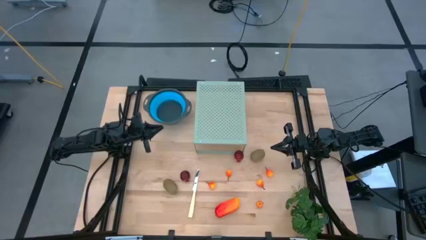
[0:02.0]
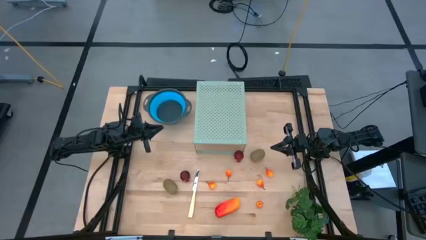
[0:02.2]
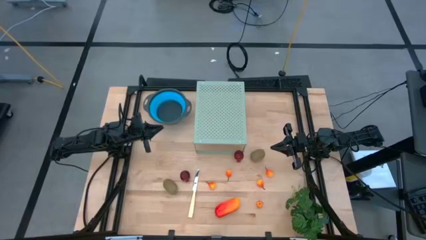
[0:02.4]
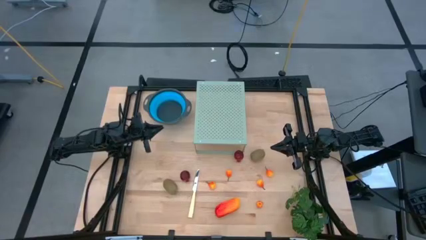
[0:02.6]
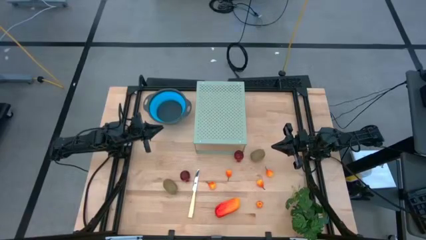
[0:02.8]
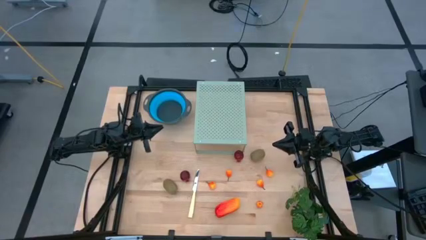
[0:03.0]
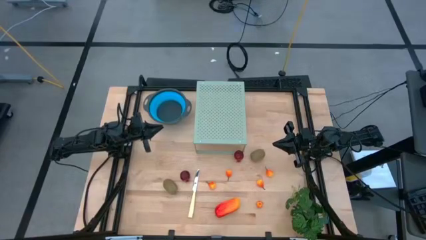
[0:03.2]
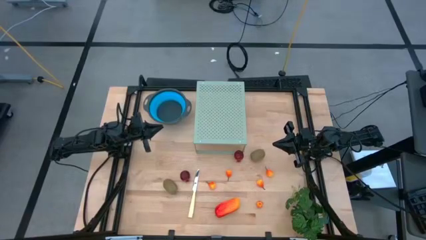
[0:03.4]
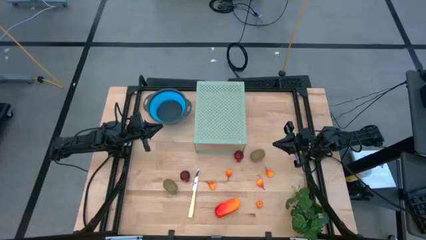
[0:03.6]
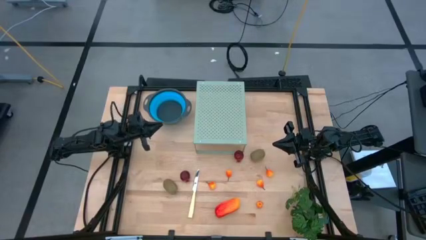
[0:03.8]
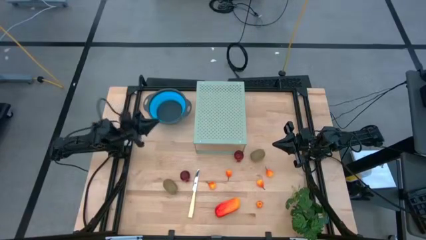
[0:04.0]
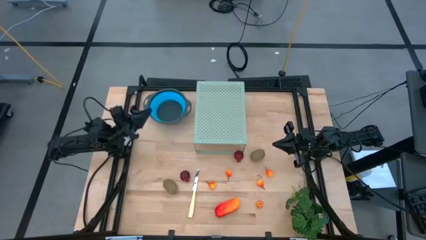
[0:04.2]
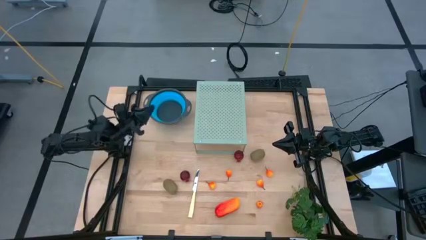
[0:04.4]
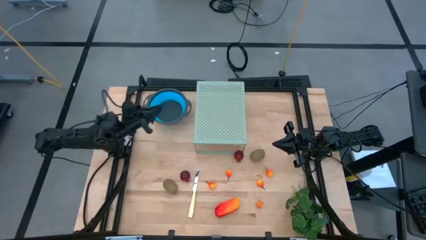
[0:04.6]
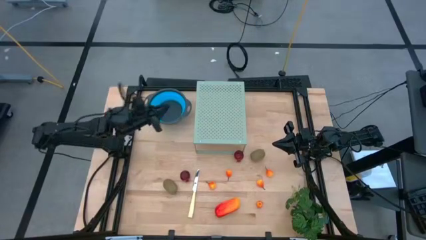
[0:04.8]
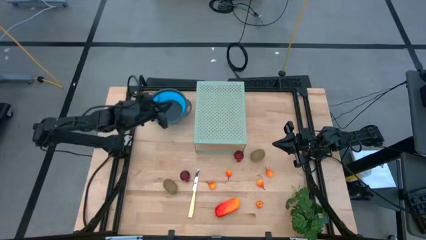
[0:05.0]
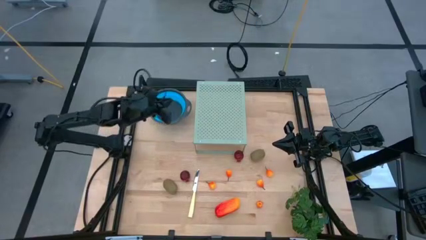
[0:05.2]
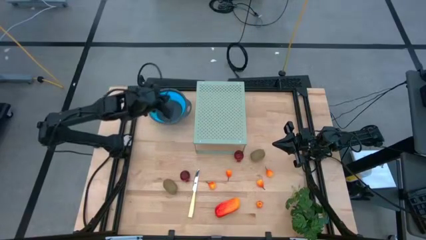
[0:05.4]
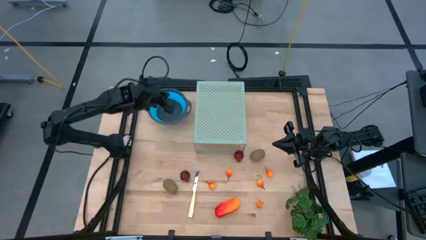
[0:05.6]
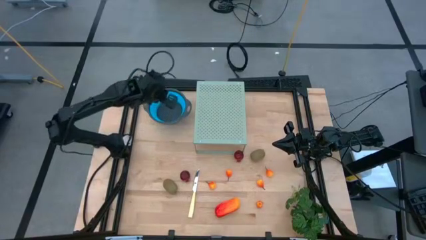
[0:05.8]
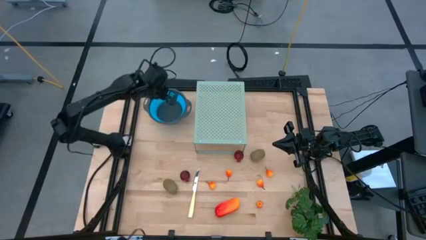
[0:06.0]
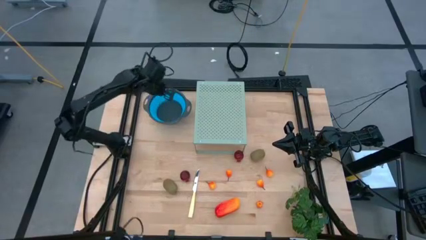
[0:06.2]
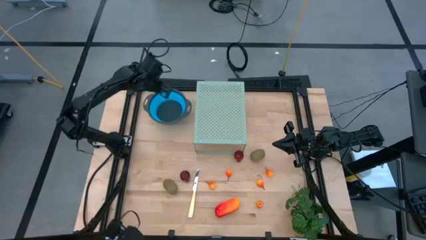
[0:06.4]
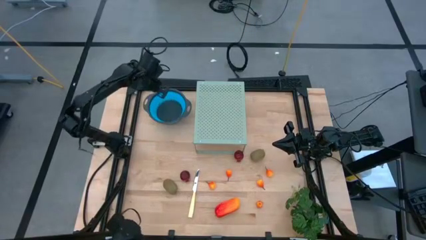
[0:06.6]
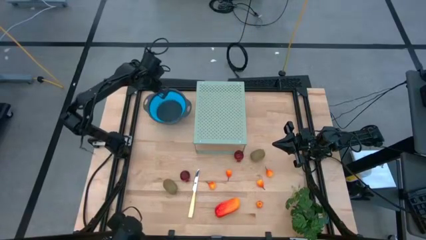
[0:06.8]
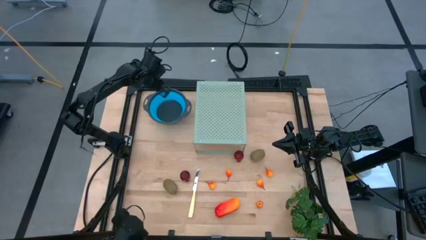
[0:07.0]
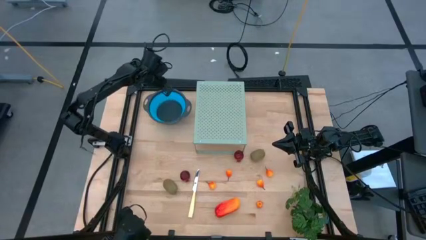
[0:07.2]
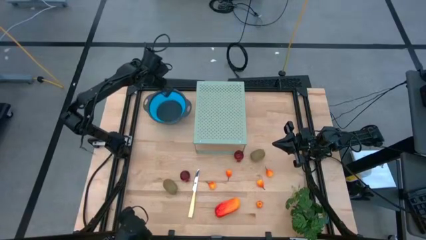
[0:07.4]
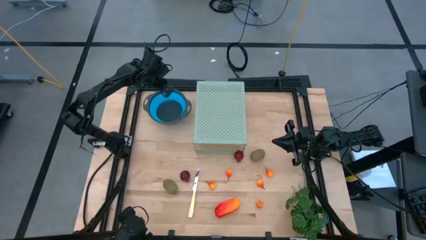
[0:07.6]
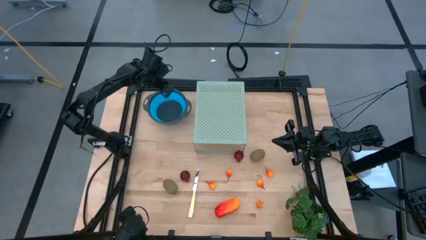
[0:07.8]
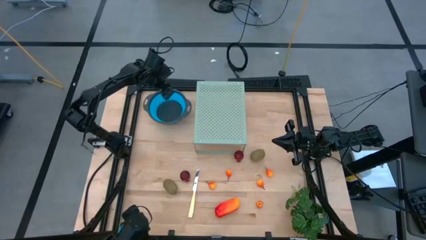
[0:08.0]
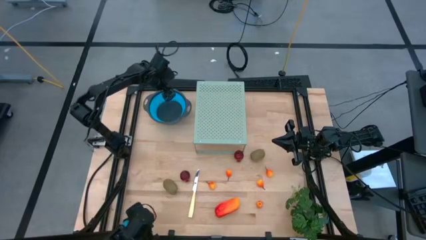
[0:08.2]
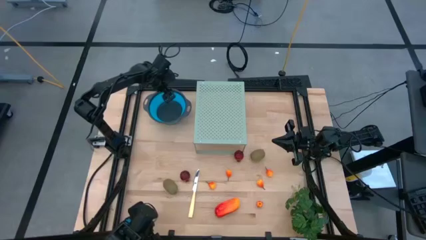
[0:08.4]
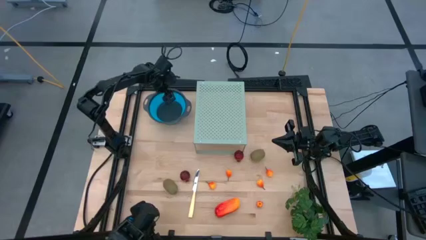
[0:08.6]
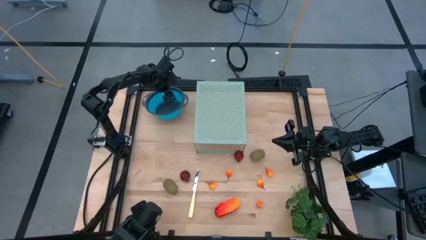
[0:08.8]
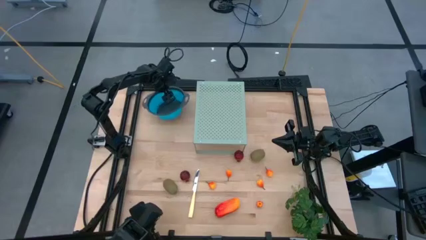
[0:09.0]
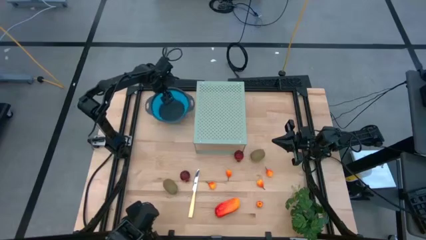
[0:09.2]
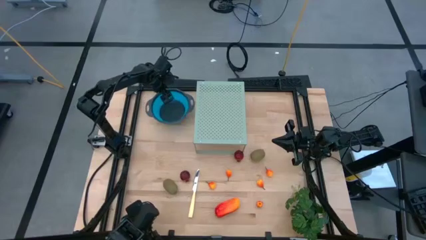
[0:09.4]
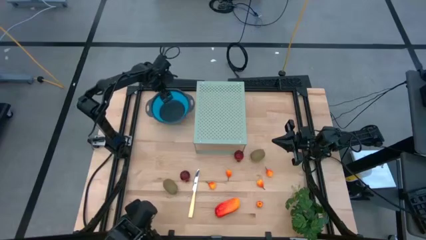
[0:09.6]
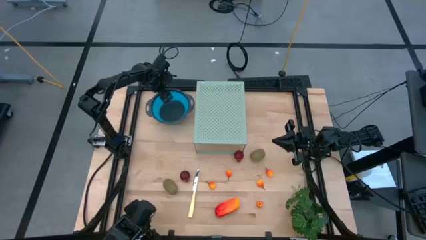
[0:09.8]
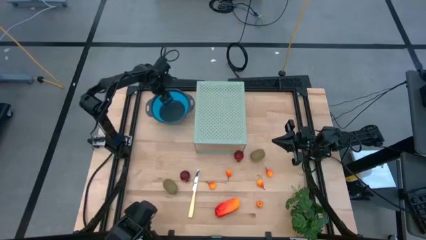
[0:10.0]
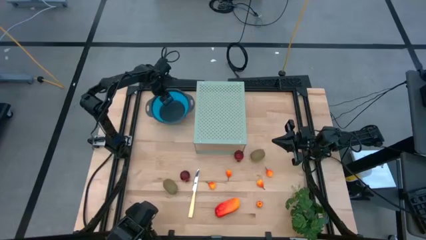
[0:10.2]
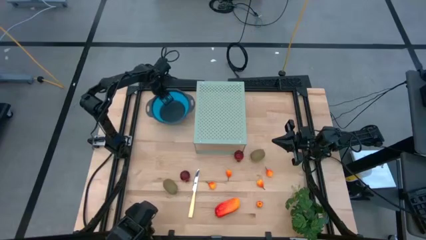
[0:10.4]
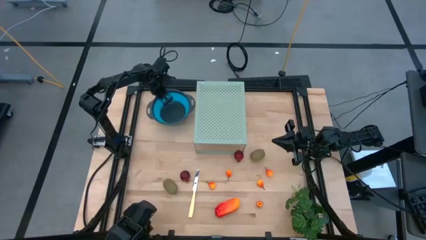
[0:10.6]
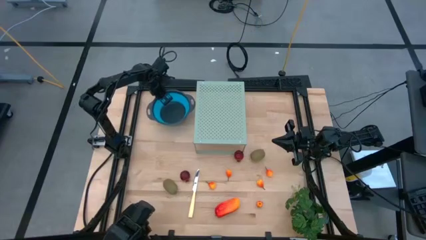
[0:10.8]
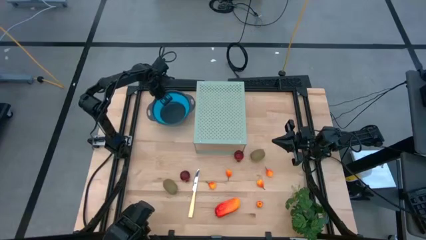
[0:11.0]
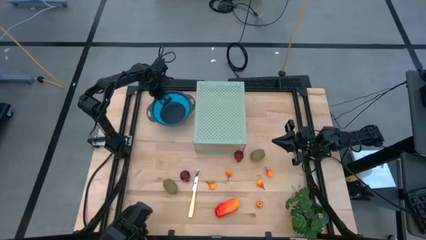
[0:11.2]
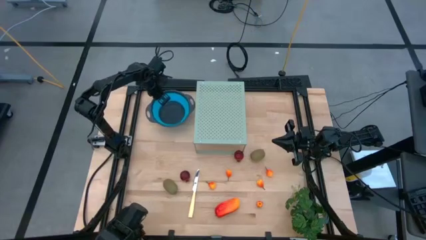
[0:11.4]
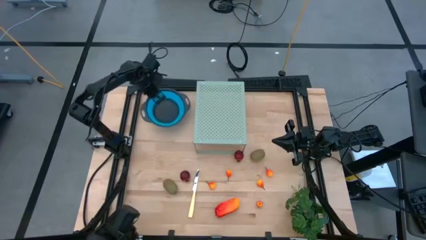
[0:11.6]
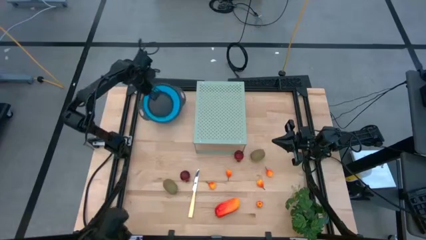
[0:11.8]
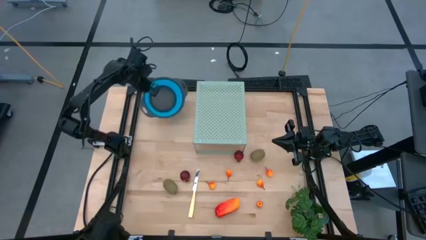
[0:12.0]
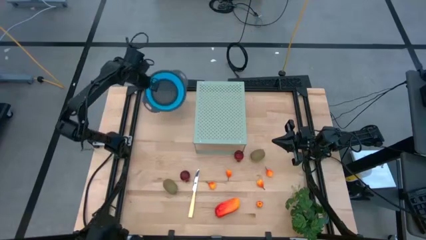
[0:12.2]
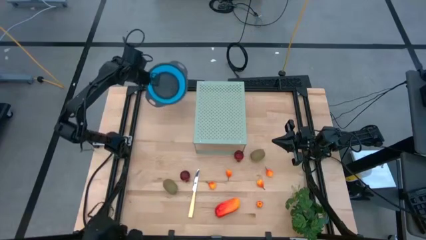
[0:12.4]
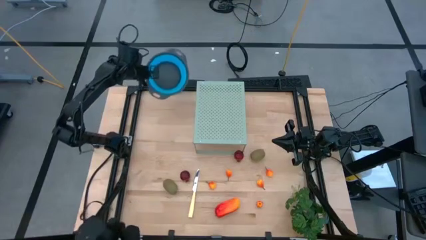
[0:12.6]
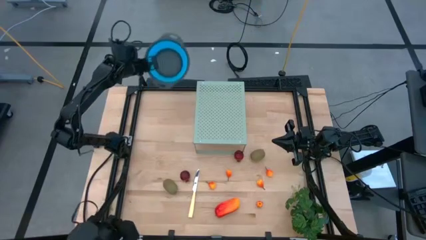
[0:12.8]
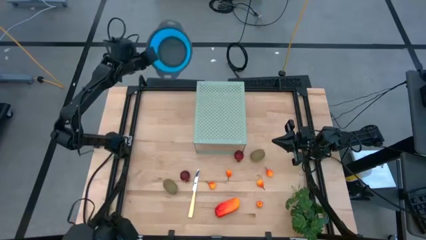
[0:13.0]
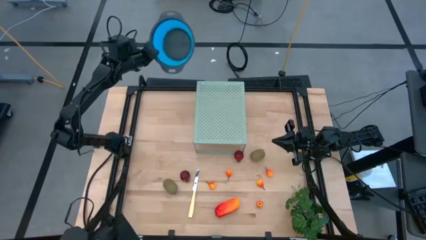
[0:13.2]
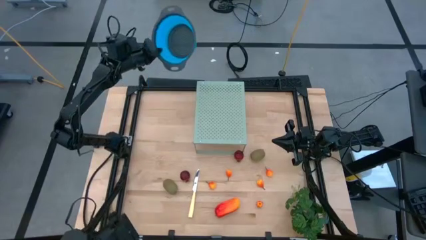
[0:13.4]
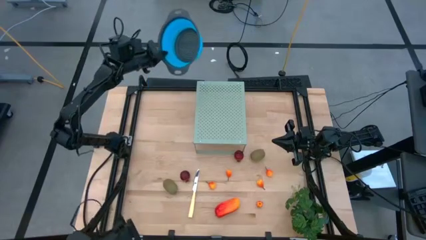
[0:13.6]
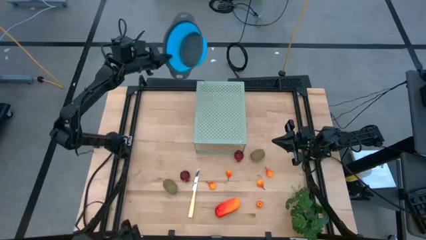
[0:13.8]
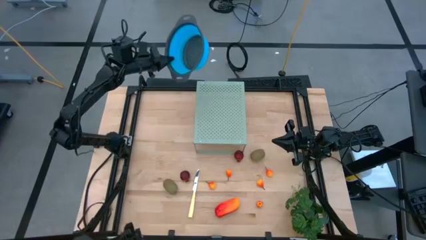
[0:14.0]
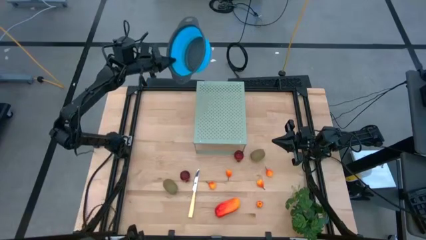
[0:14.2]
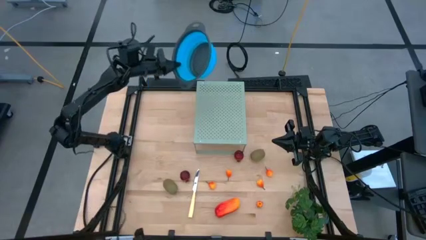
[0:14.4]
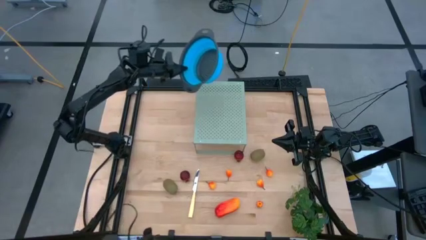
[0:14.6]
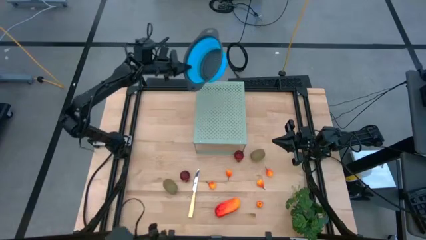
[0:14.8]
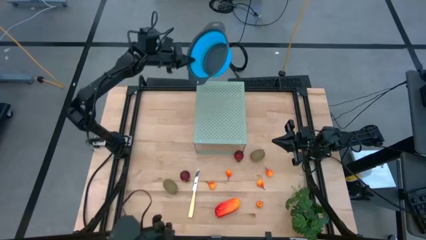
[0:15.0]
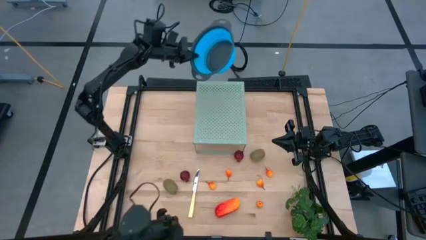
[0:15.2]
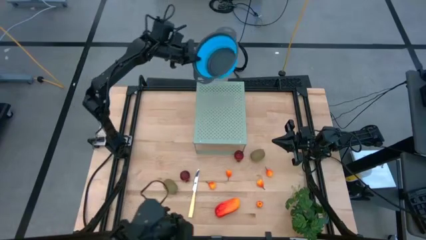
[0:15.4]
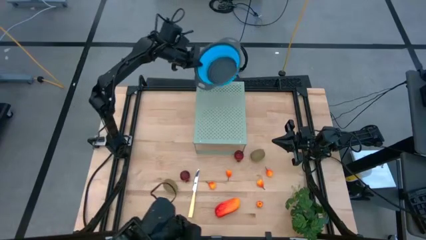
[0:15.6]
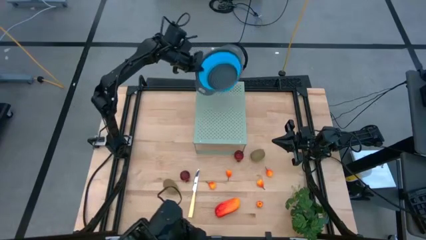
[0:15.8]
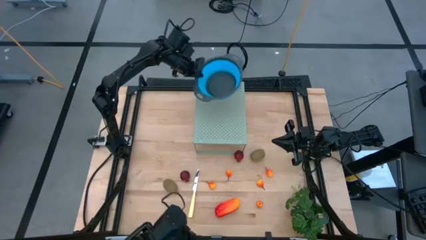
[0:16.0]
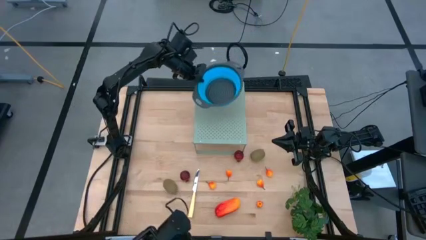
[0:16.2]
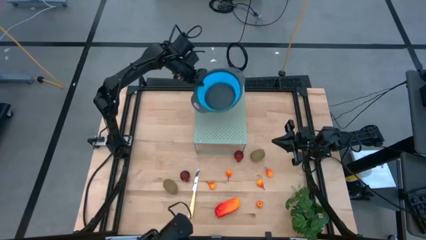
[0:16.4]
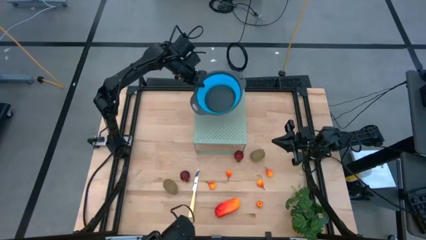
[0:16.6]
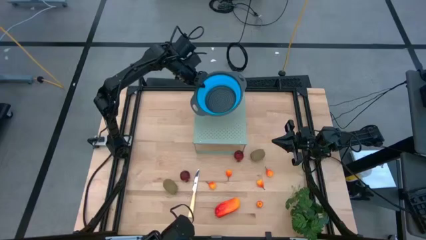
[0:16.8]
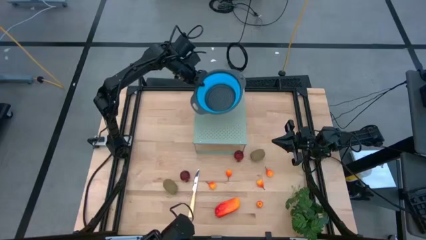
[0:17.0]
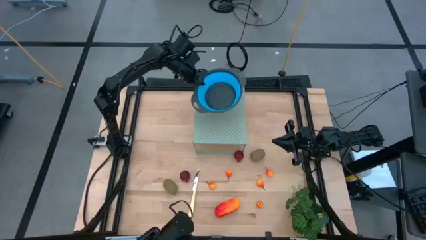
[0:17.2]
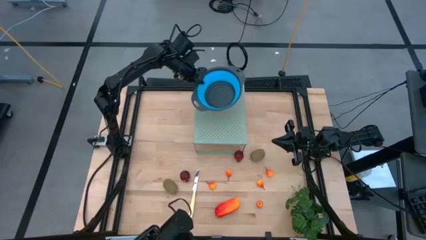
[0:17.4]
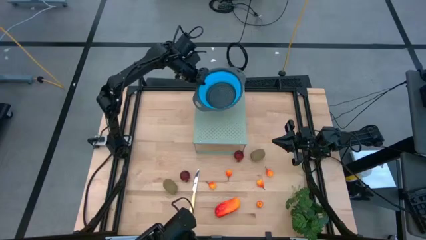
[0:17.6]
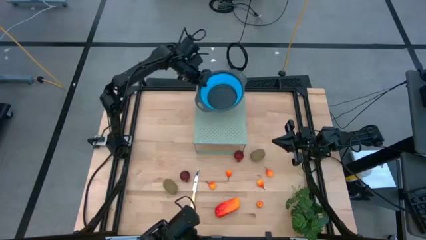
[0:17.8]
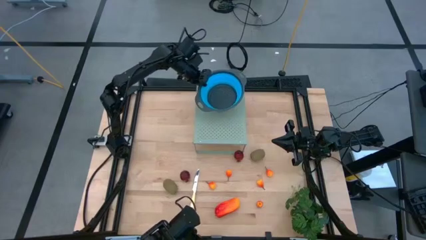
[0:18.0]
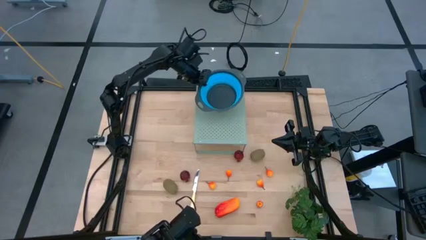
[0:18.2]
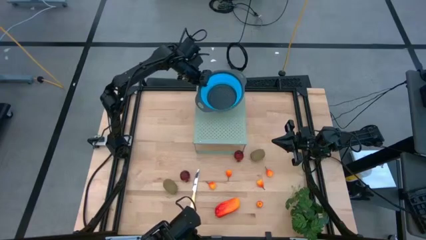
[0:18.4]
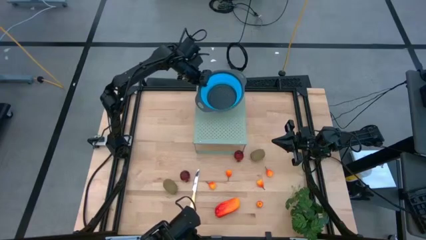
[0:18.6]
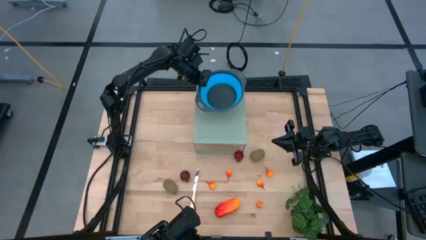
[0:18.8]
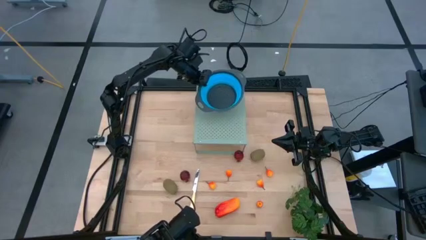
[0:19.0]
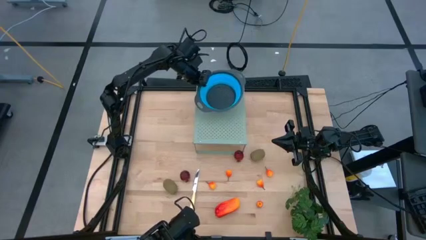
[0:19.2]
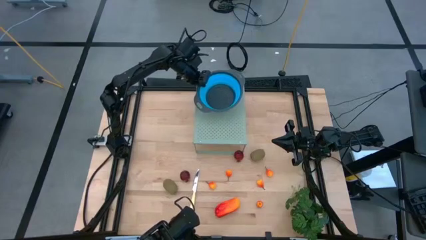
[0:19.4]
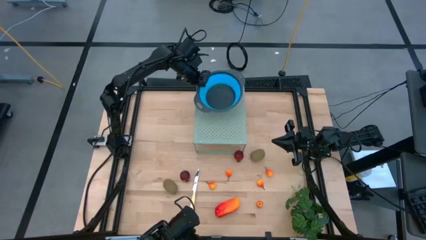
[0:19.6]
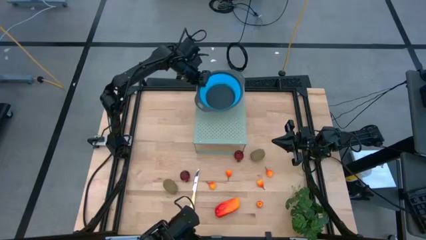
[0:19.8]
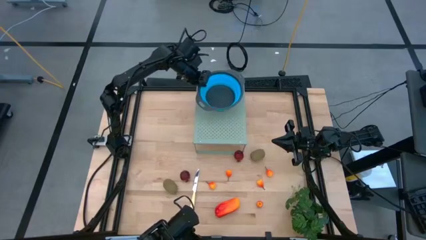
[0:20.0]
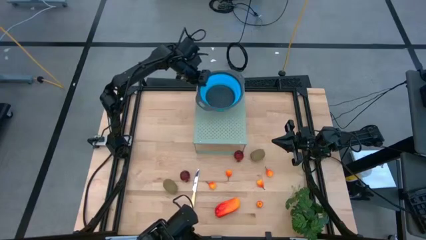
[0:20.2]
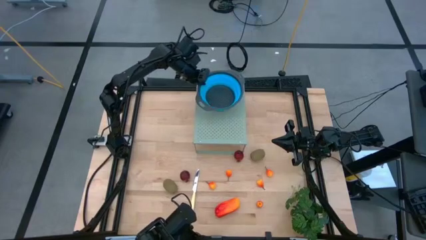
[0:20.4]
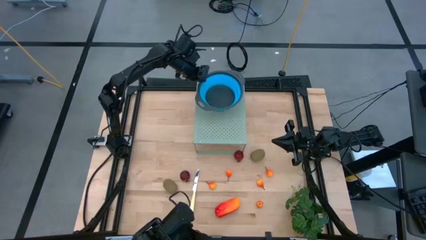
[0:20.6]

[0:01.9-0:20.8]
Task: Pick & Place Fruit
Put the blue strainer bowl on the shelf
